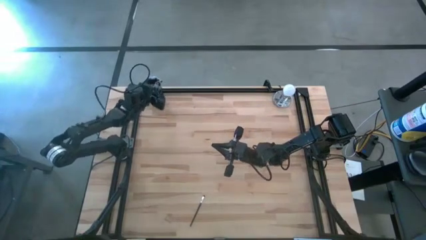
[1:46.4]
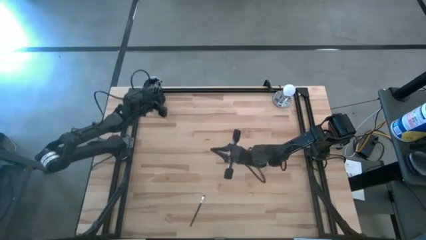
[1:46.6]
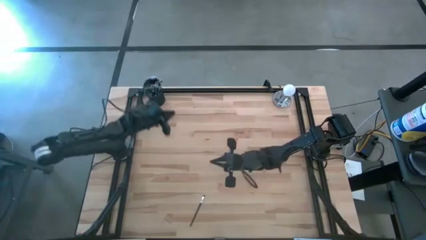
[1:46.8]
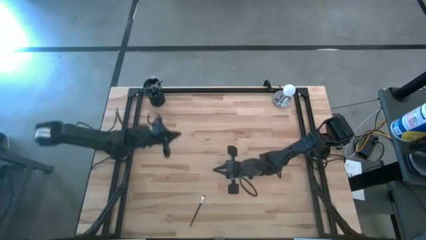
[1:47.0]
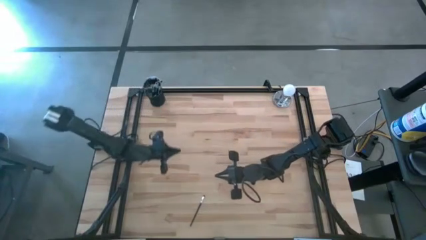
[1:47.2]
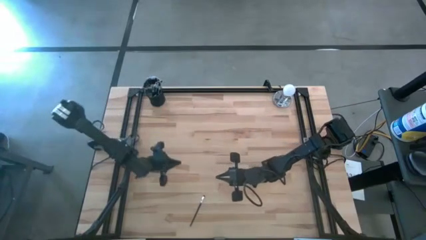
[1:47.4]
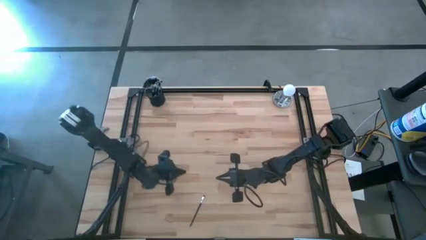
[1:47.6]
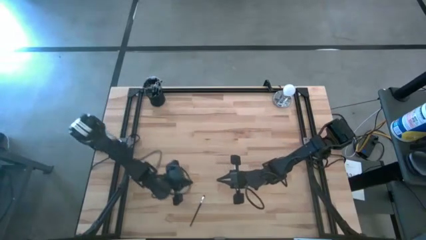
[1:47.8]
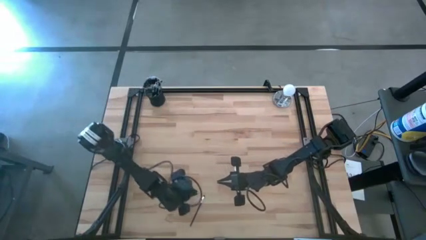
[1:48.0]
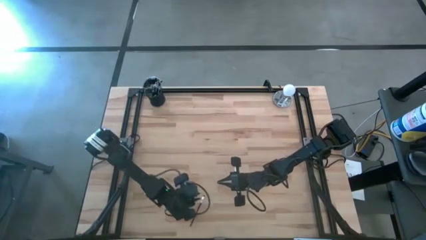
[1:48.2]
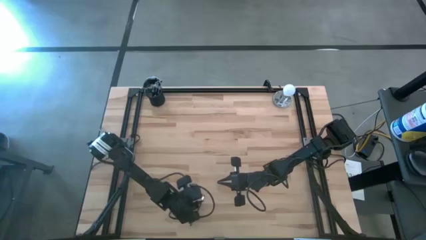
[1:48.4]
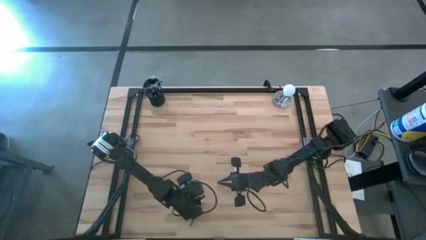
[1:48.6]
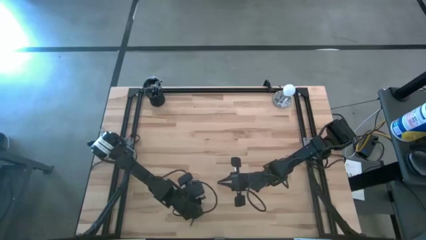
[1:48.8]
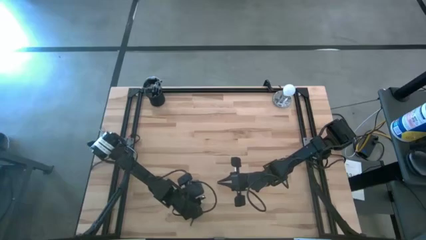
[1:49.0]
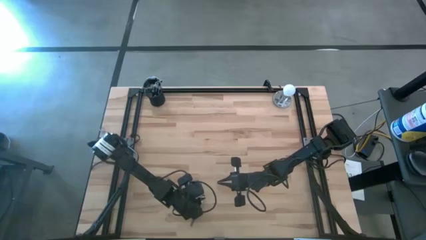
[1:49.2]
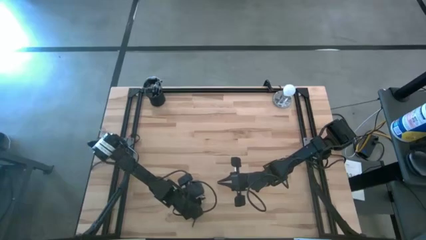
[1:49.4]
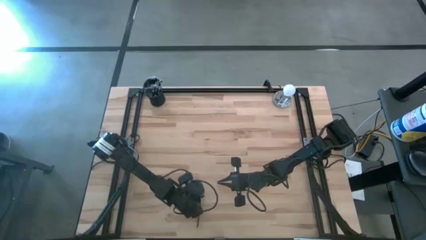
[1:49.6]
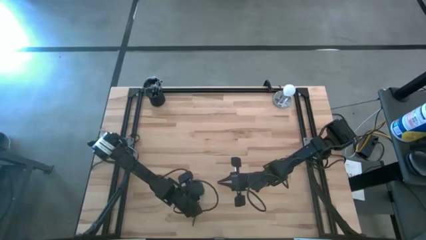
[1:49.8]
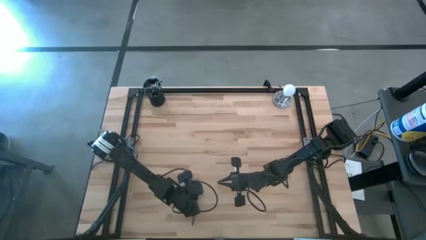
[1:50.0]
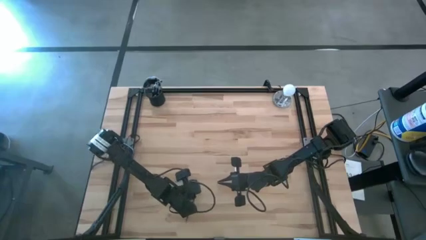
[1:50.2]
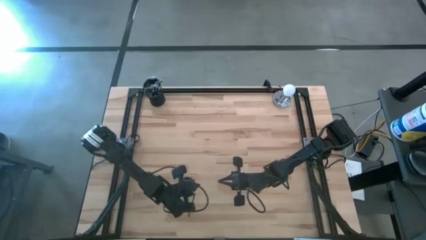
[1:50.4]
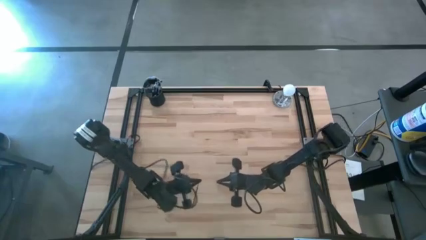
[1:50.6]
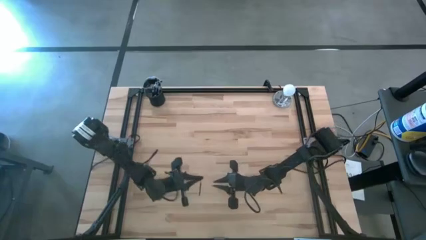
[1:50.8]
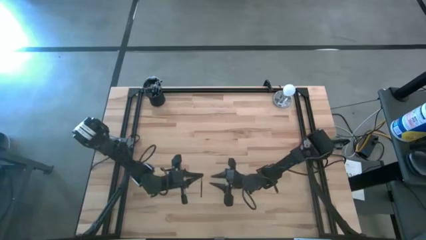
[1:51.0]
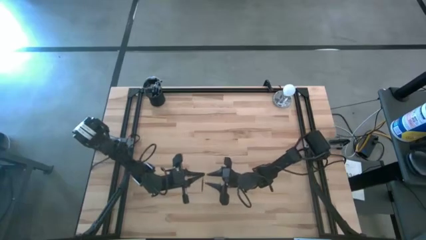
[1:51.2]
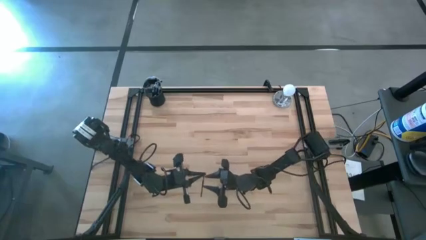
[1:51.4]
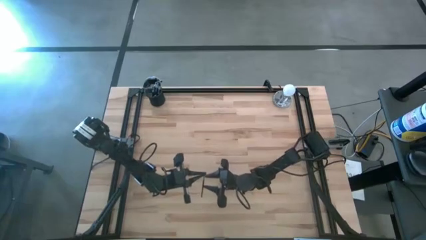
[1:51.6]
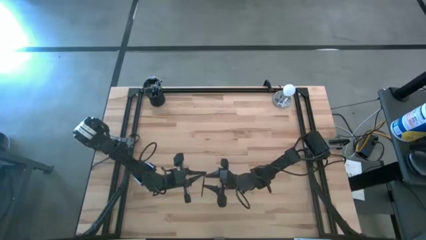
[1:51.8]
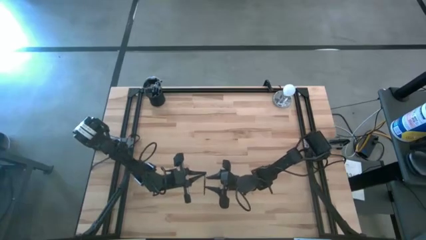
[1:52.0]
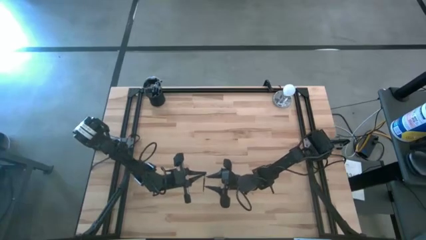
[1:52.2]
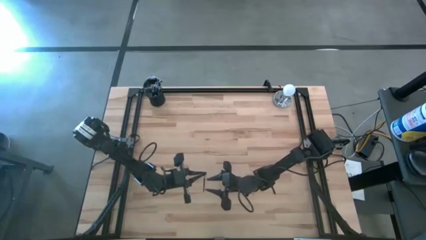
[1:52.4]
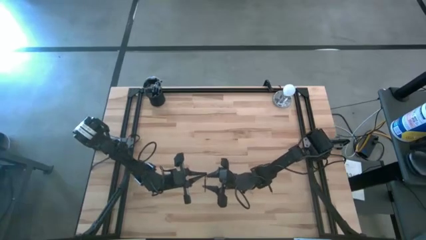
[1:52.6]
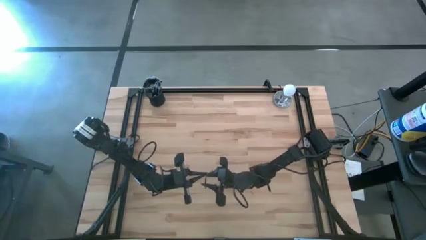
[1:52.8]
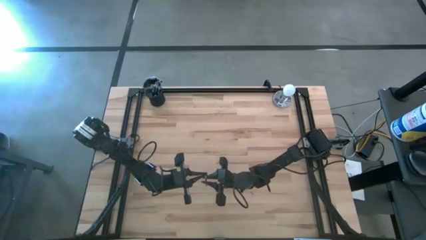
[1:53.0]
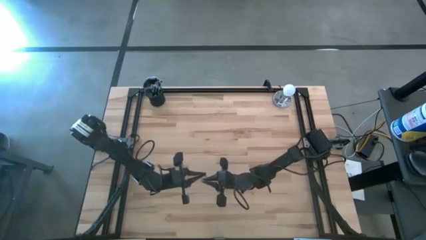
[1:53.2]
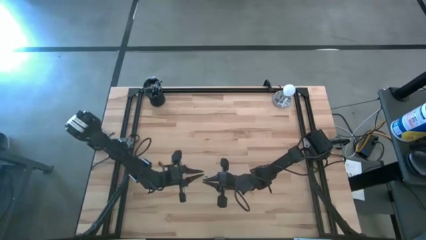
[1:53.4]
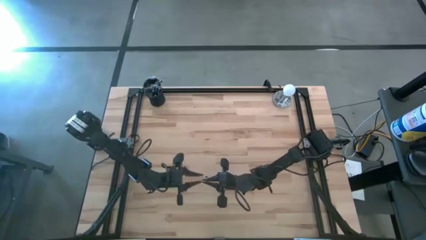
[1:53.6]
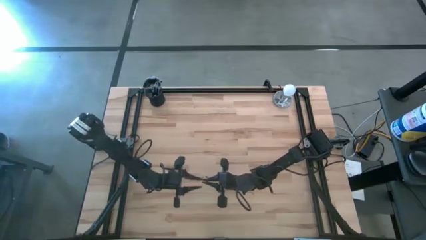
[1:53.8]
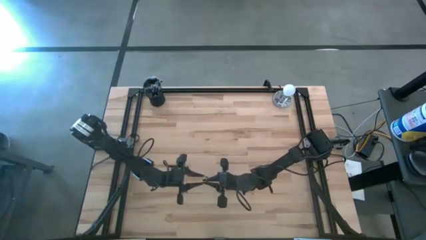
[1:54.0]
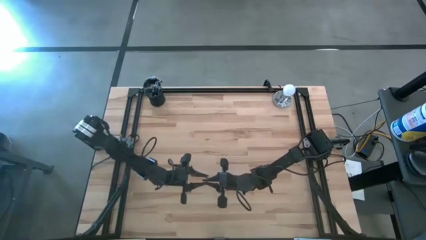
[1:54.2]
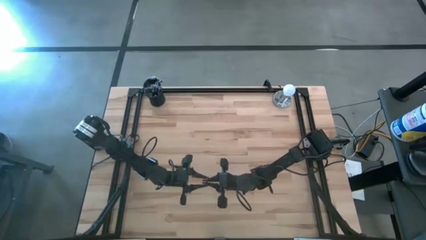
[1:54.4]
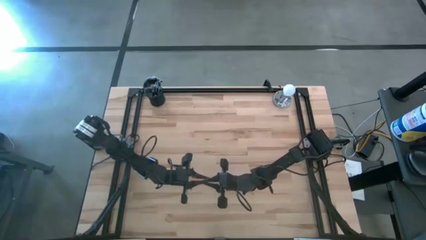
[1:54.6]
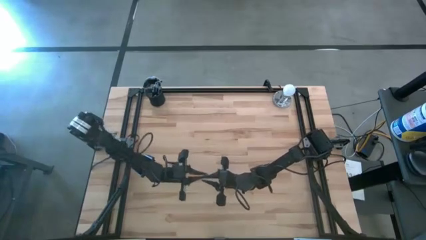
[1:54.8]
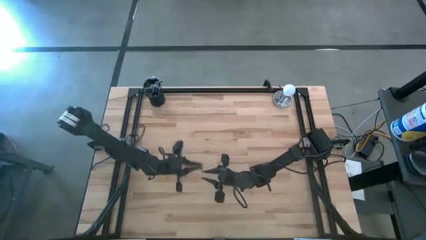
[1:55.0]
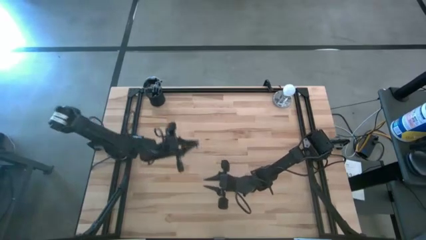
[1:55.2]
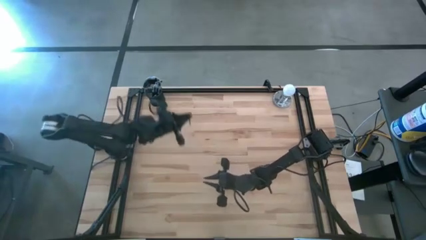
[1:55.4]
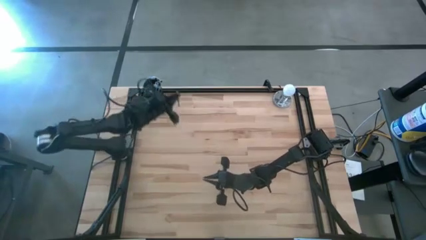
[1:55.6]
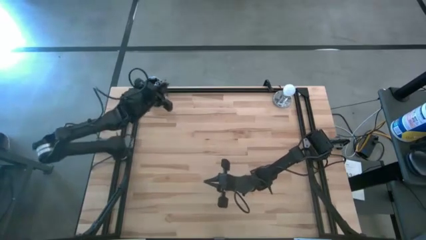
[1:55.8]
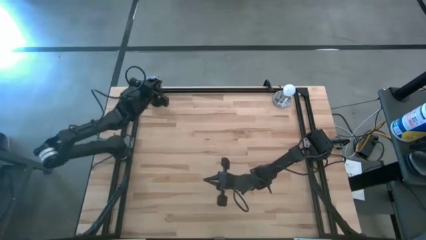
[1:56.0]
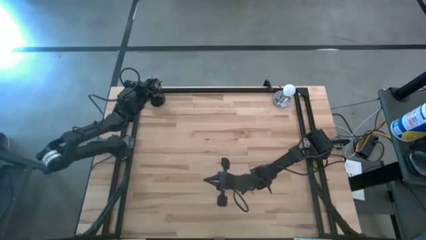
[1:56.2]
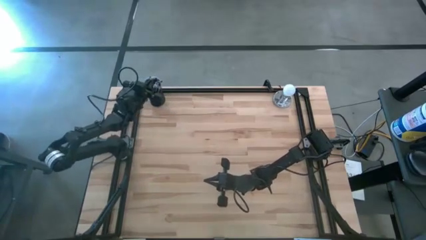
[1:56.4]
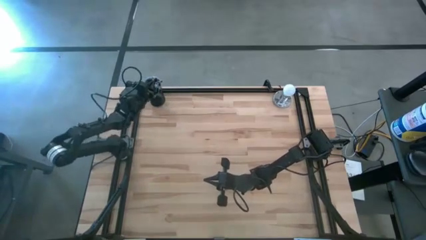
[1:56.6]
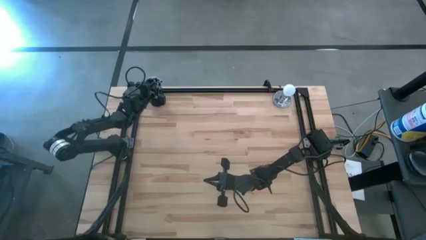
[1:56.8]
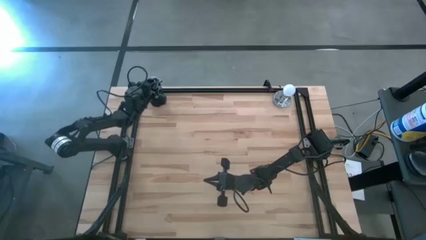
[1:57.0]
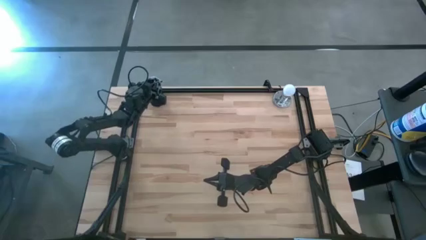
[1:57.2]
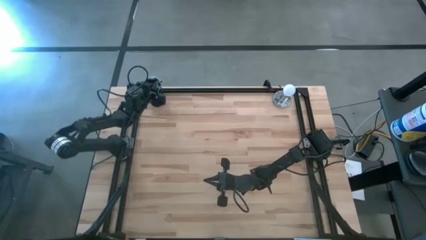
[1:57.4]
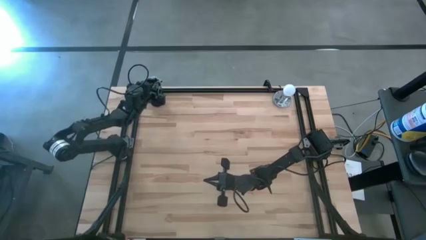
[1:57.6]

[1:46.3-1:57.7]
Task: Pick & Place Makeup Supplies
Put the makeup brush into the makeup holder

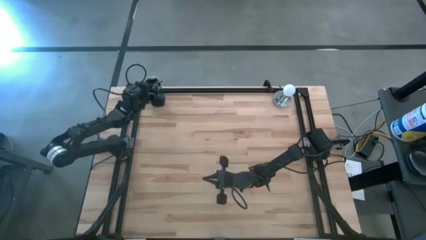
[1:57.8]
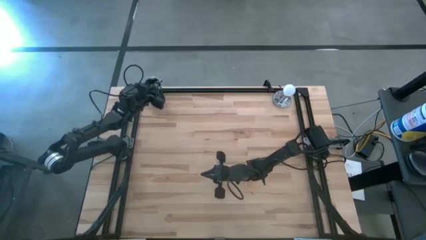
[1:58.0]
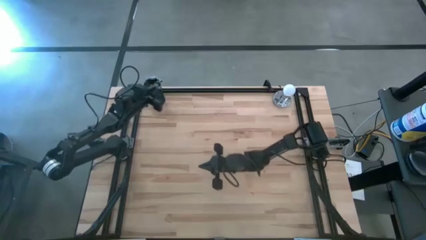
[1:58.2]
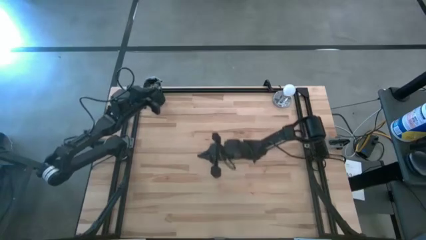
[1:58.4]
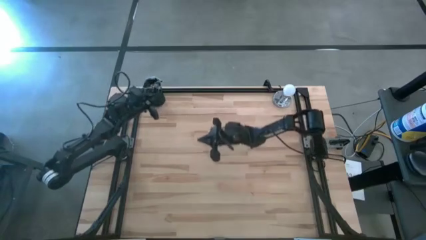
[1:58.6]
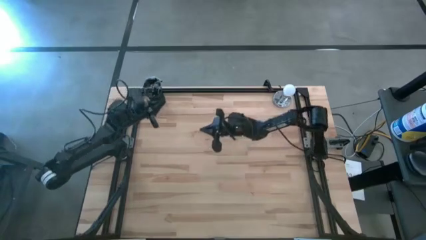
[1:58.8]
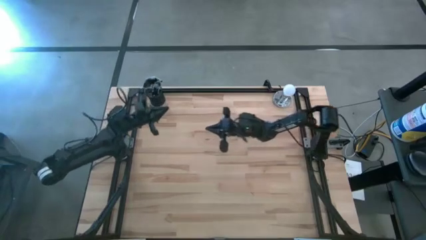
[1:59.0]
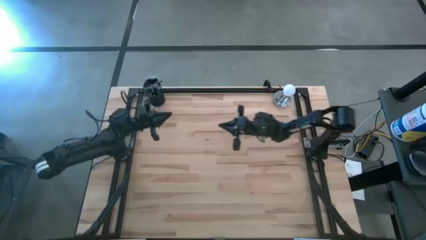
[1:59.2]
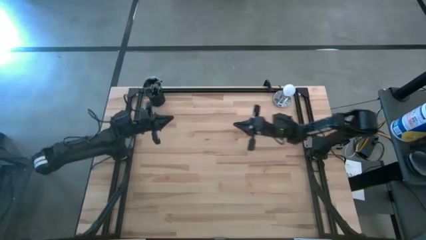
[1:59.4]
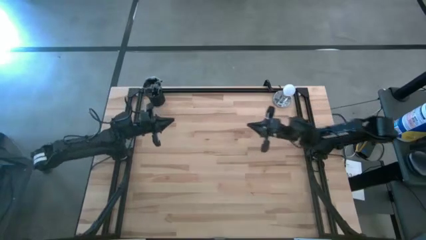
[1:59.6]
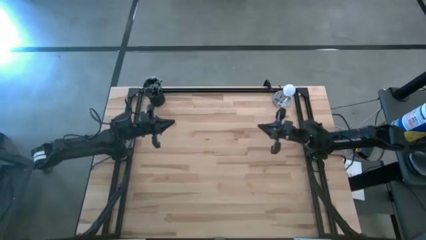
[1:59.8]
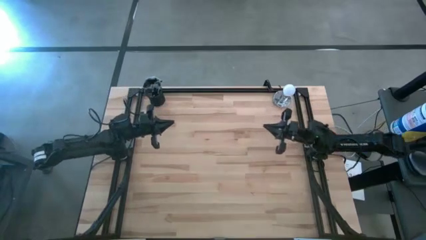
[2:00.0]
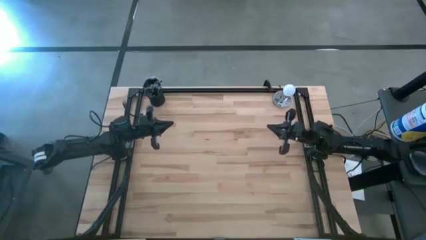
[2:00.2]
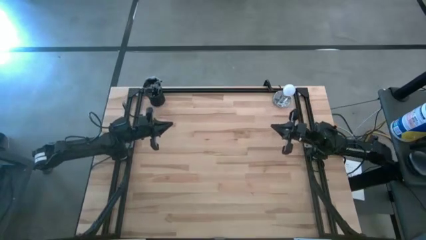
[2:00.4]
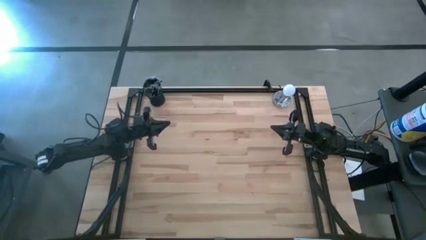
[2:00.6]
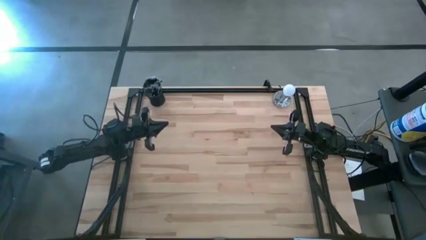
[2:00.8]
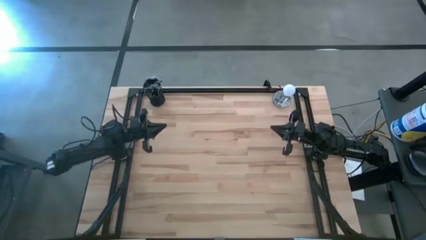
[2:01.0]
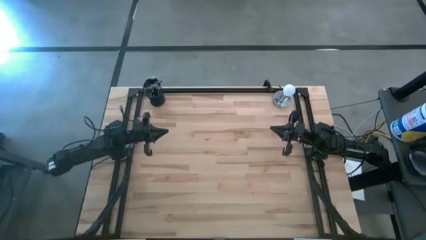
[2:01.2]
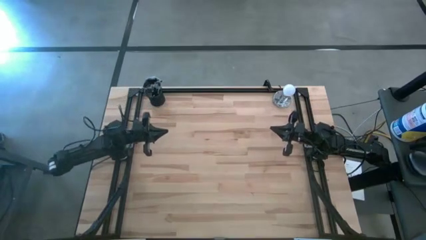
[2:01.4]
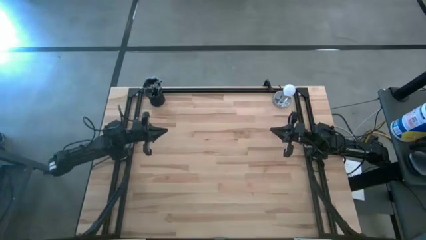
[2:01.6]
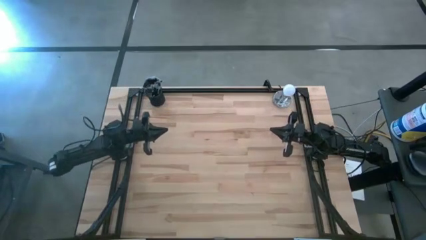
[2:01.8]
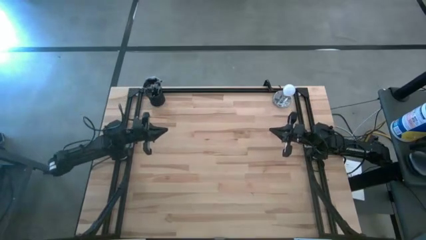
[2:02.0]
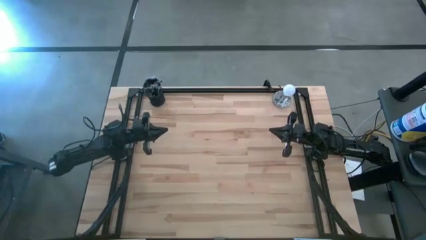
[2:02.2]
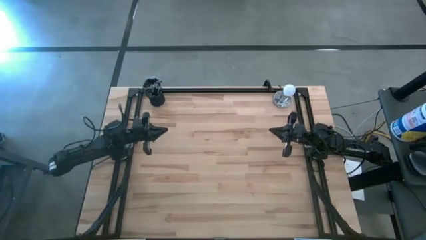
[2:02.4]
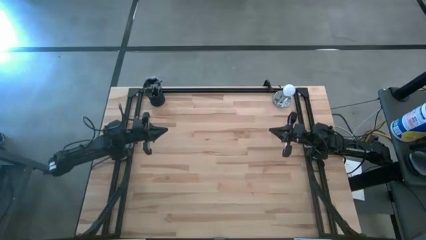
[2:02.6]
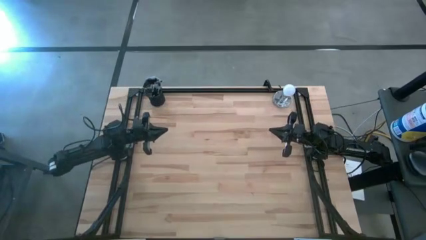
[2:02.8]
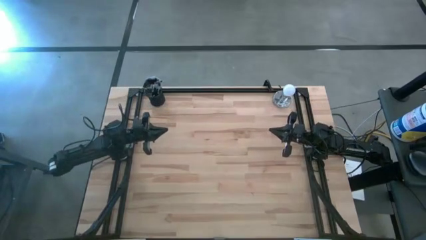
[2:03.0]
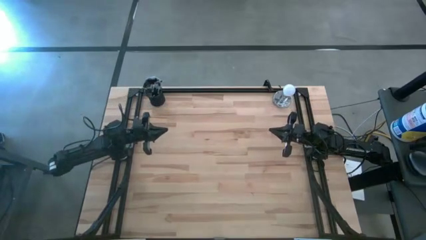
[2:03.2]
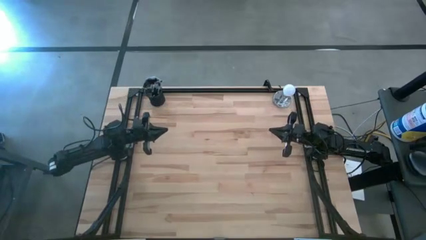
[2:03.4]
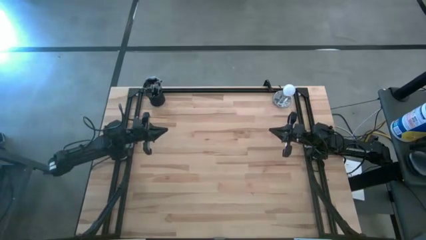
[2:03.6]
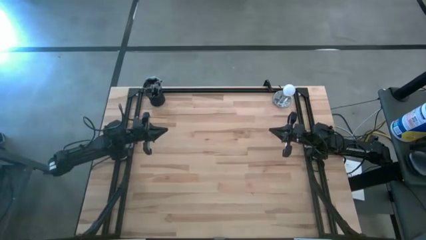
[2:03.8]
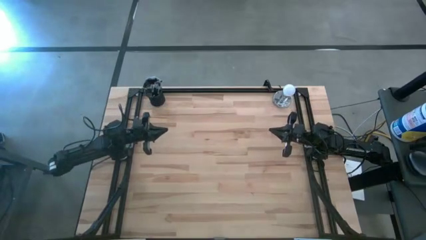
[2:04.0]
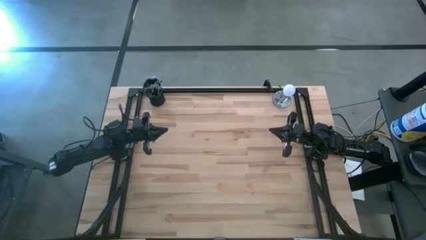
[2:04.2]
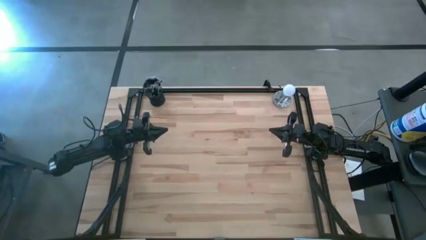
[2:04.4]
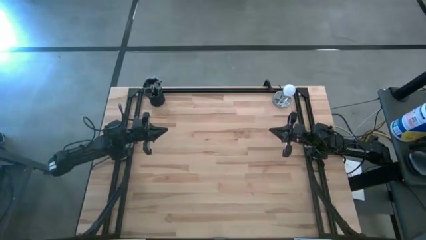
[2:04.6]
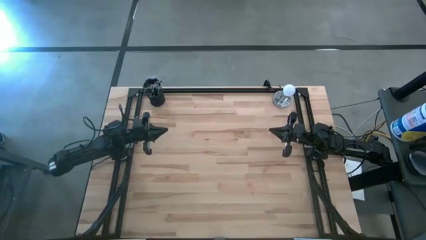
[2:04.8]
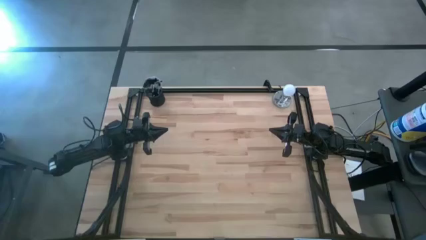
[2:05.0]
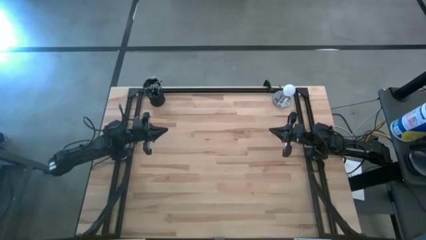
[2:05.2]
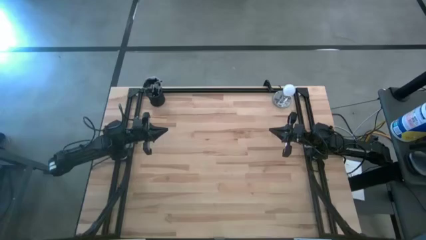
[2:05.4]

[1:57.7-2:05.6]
Return to Home Position
